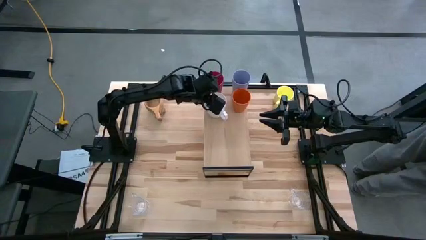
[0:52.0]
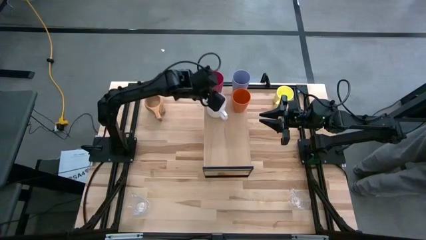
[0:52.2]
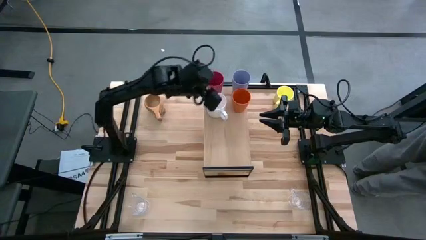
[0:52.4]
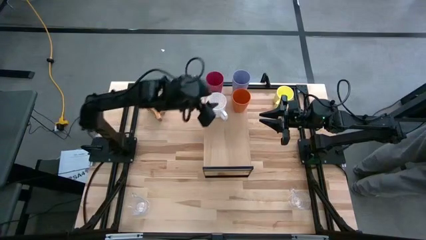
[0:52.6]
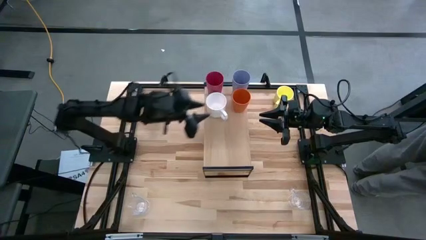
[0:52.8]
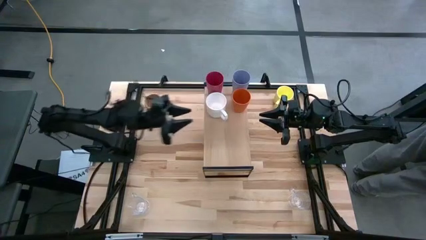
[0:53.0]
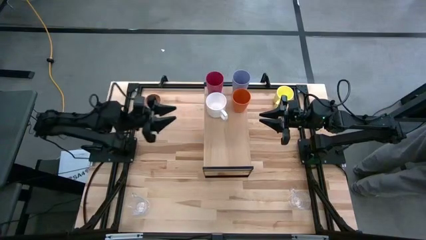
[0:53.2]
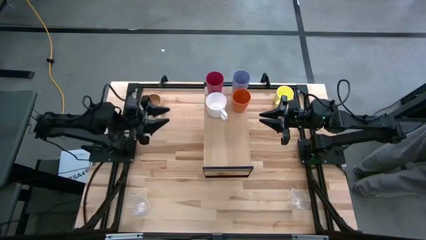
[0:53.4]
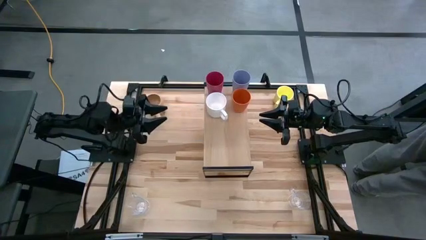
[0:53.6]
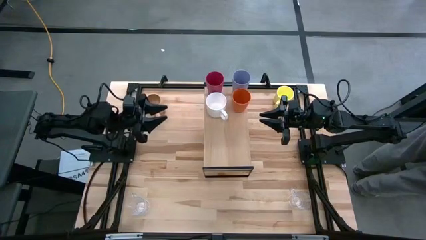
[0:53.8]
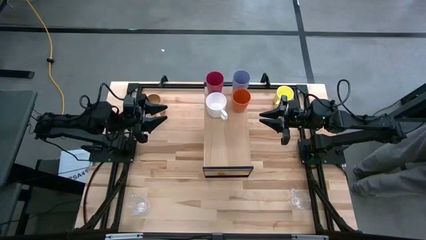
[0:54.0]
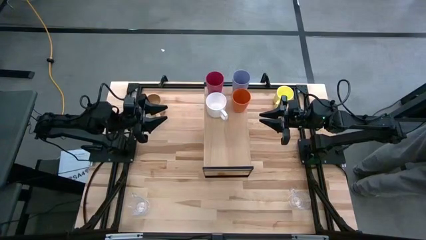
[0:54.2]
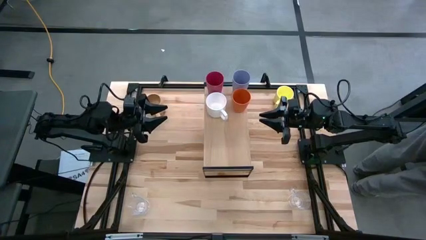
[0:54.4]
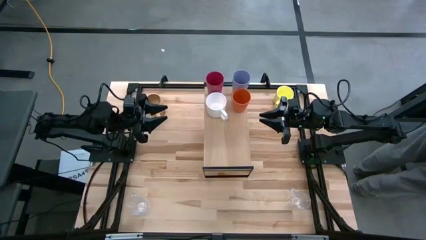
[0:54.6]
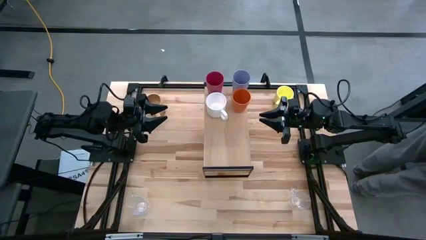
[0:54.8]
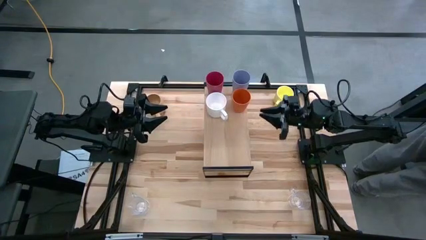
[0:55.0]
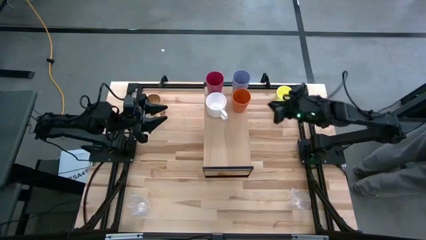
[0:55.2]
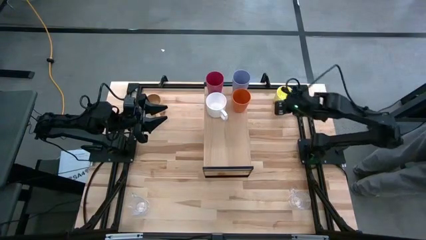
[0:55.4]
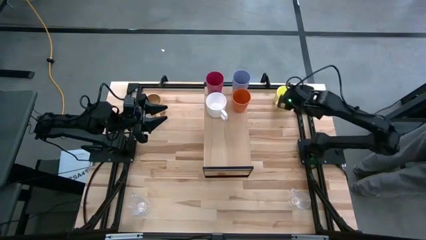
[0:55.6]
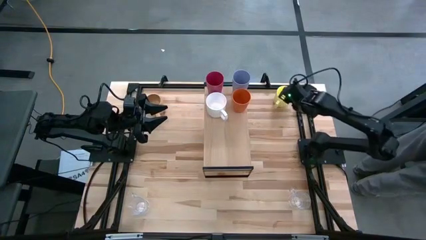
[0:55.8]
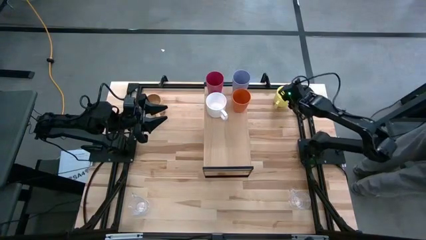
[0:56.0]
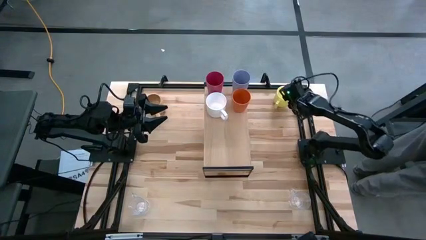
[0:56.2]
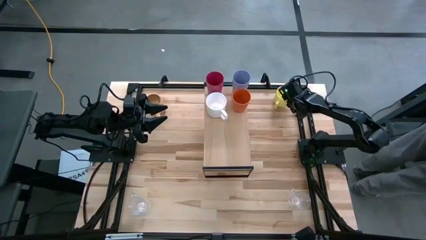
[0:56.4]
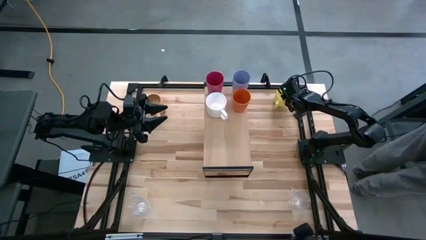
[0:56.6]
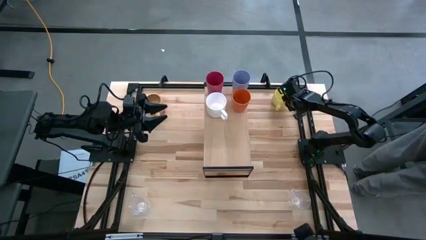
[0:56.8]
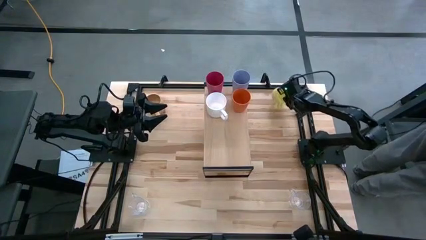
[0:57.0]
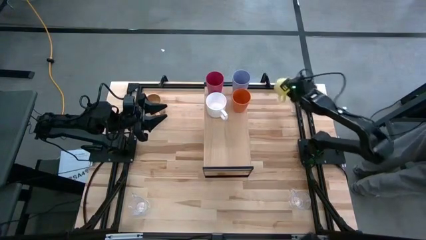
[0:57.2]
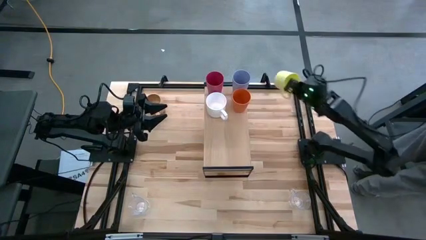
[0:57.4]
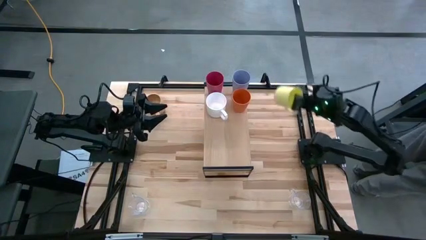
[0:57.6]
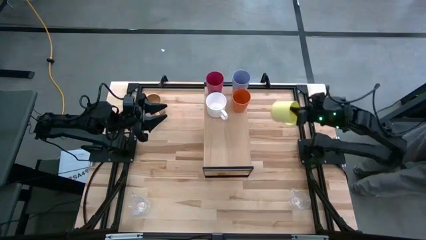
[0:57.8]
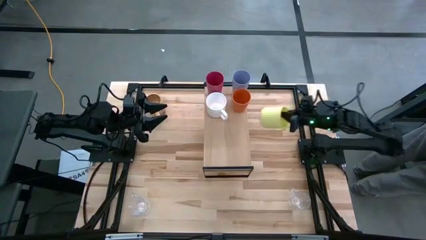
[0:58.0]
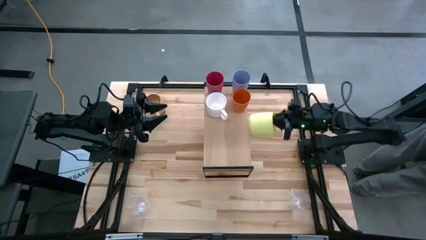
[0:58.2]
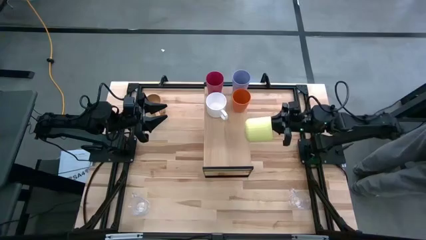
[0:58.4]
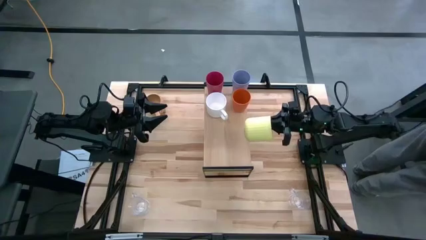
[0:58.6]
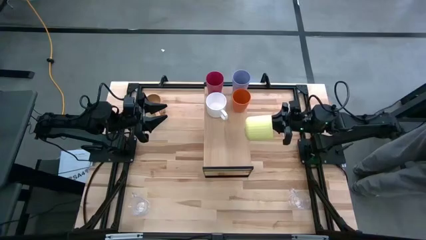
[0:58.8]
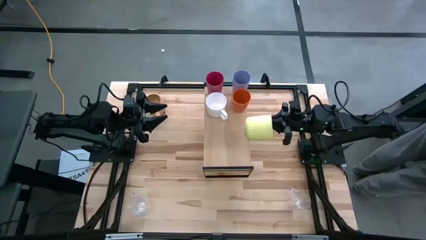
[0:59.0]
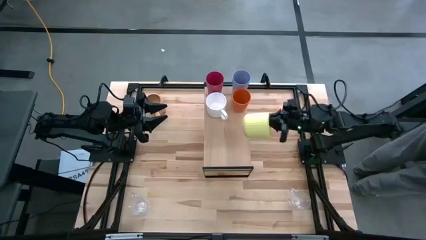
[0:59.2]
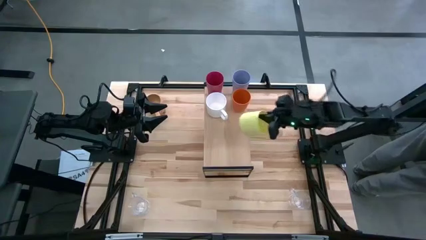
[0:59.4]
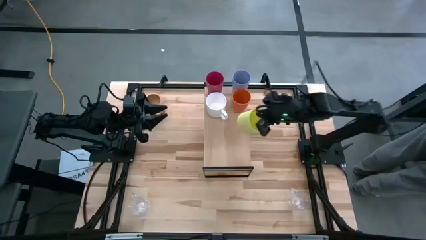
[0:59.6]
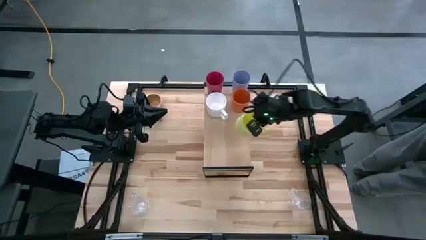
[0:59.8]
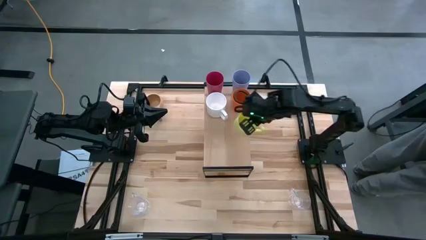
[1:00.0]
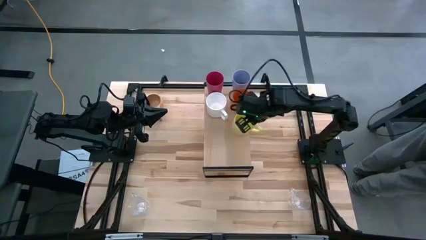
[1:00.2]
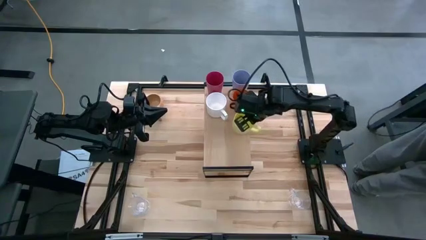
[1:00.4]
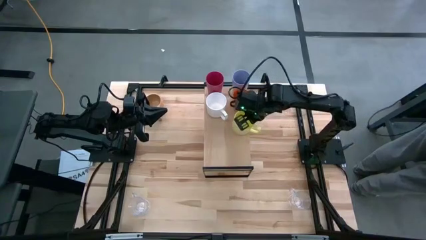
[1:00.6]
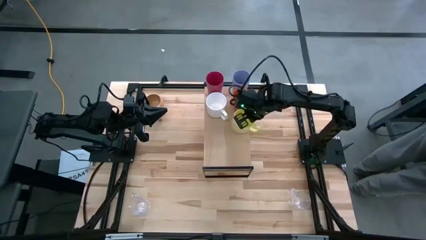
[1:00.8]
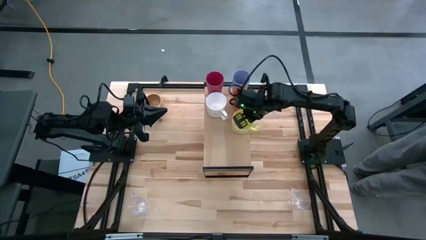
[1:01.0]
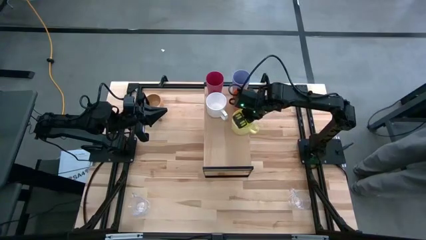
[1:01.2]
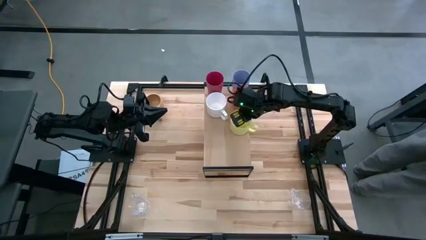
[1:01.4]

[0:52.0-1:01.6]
Task: Stack small to large cups/mugs on shelf
Put the yellow cup on the shelf

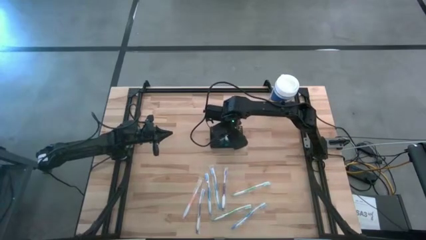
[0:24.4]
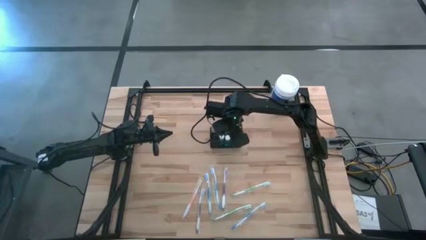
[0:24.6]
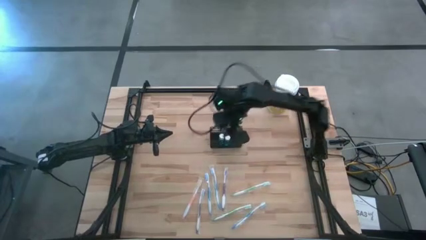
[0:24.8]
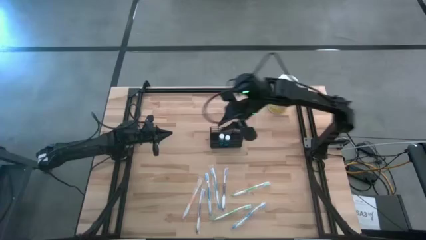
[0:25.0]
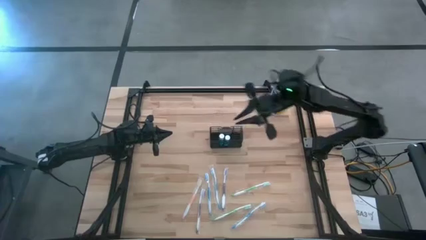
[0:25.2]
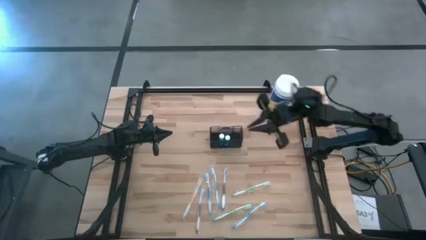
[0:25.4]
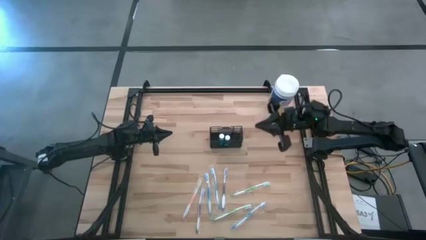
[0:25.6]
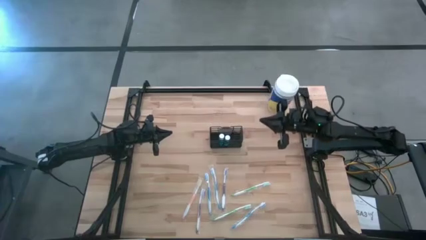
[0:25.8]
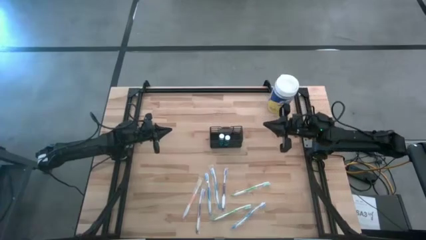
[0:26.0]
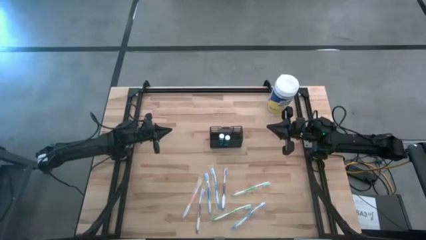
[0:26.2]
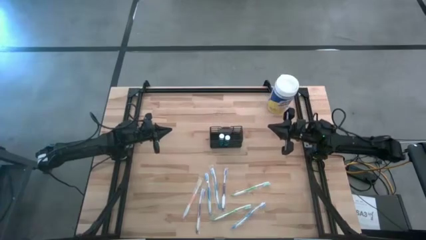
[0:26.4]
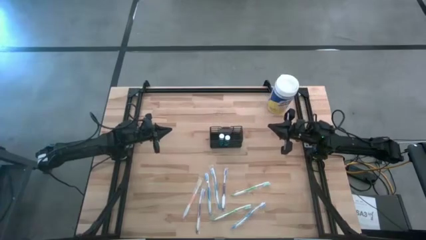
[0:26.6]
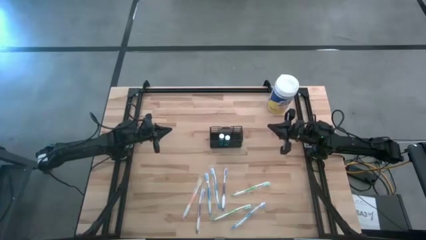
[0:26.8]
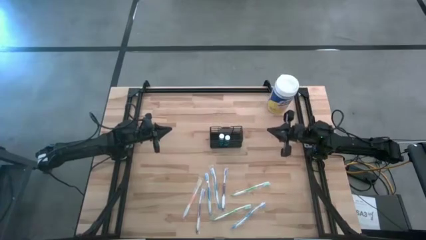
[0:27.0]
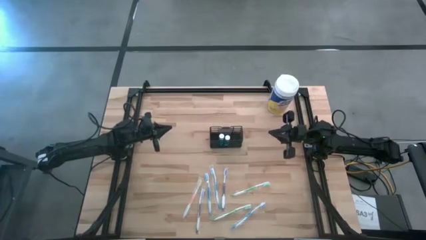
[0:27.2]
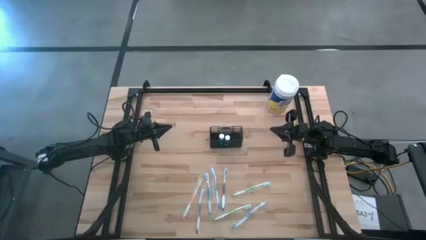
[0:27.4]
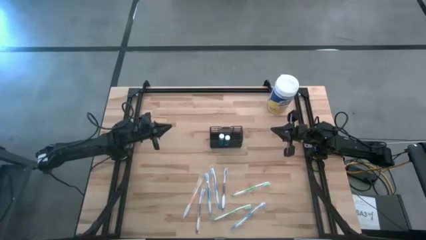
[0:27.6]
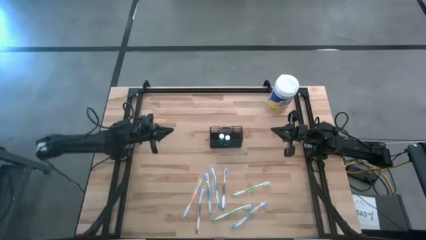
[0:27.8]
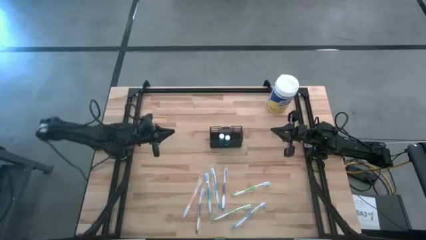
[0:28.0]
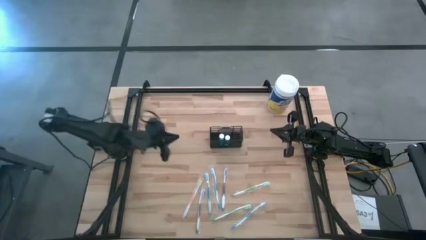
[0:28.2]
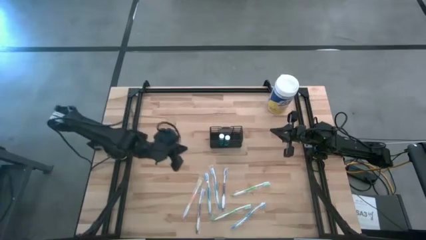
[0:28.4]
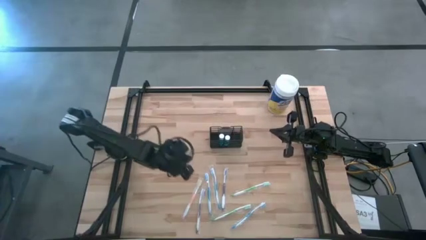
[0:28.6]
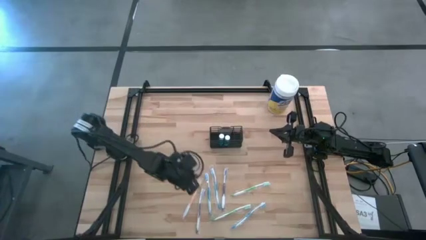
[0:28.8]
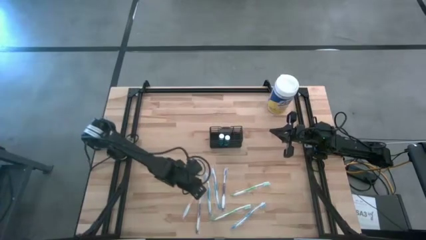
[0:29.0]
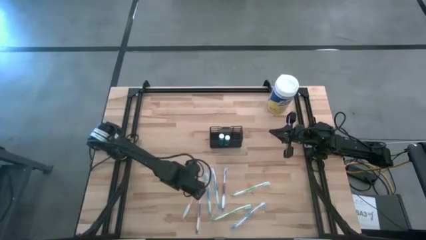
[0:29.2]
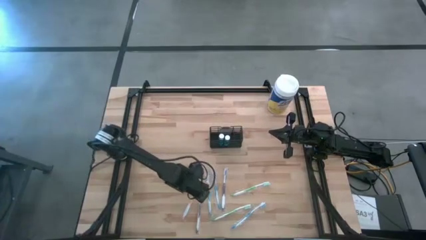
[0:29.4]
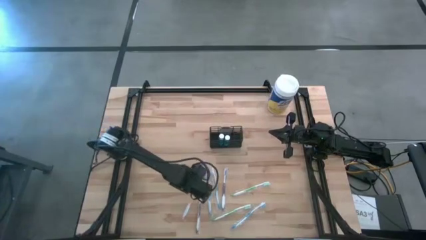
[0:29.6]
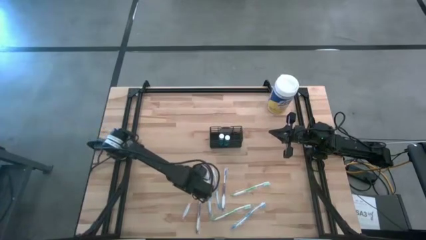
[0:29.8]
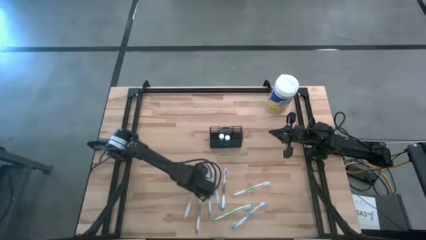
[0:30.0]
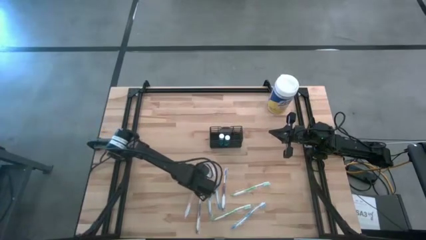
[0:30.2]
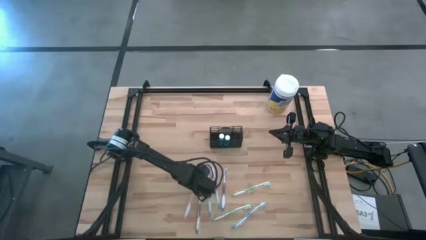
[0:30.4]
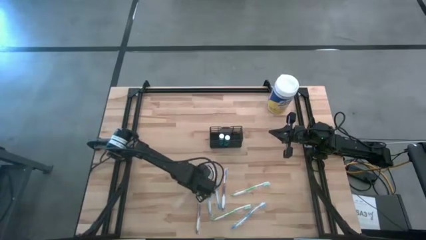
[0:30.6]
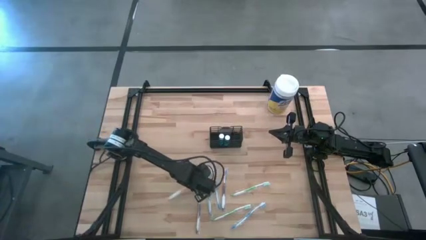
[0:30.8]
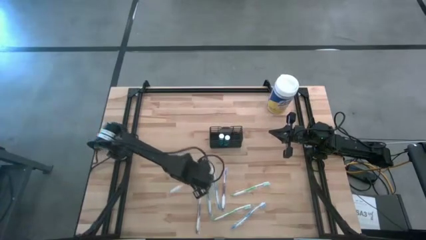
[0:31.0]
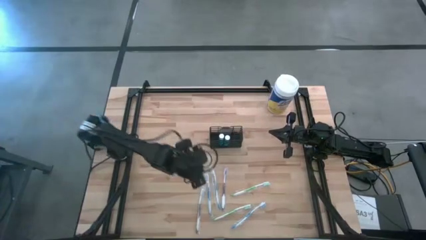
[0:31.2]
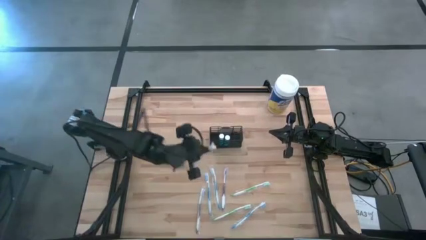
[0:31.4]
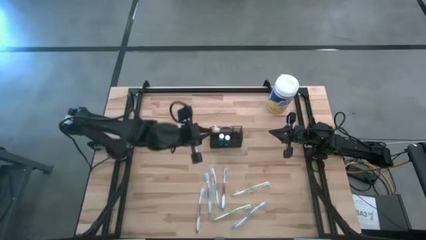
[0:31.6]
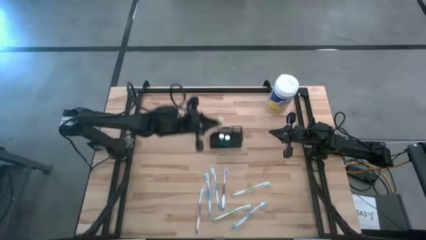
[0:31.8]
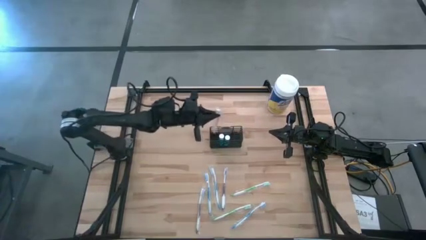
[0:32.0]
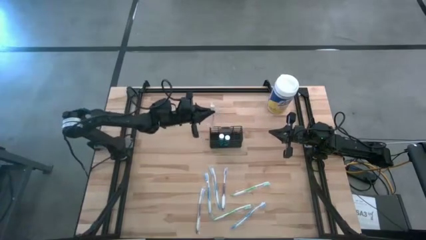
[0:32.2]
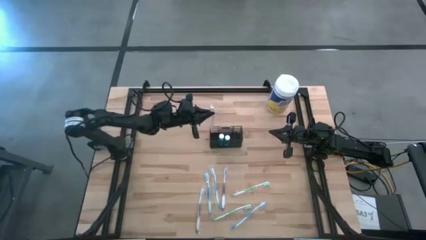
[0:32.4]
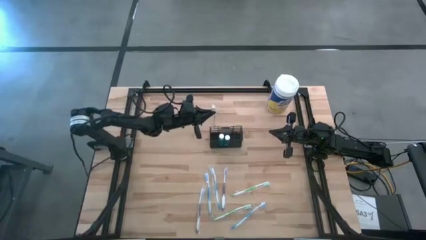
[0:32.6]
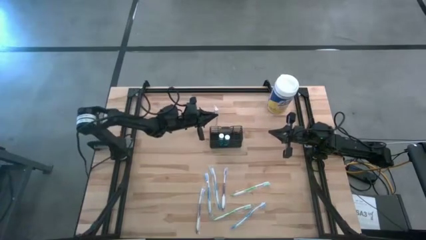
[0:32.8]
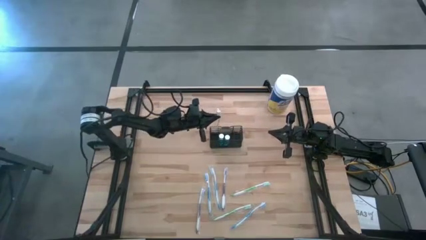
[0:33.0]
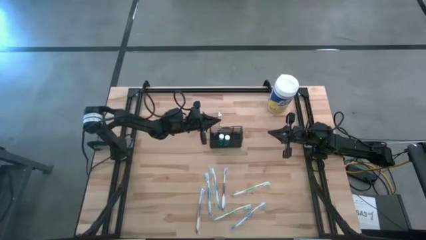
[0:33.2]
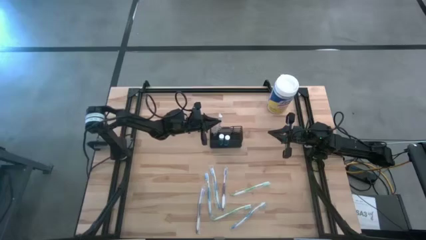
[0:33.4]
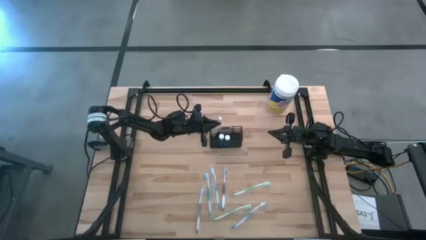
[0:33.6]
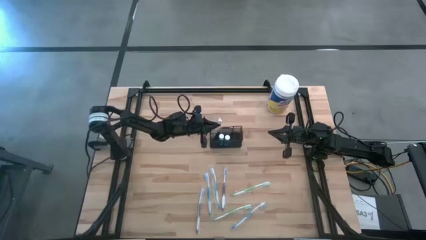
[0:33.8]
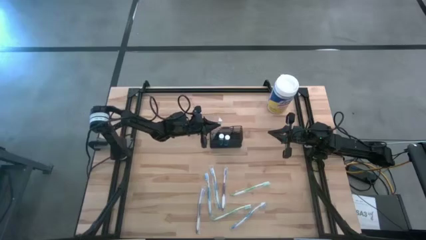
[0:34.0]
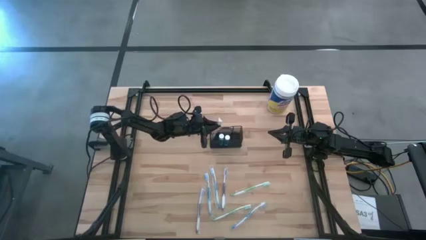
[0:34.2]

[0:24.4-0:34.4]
Task: Pick & Place toothbrushing station
Put the orange toothbrush into the black wire organizer
